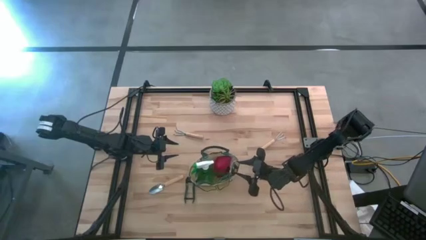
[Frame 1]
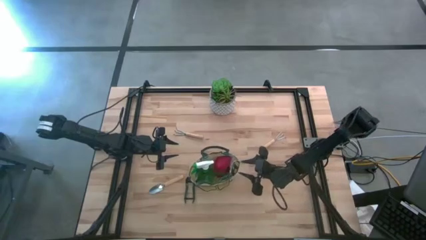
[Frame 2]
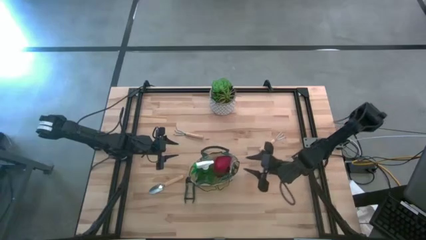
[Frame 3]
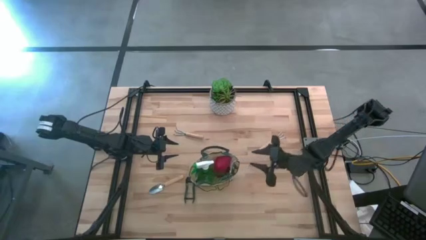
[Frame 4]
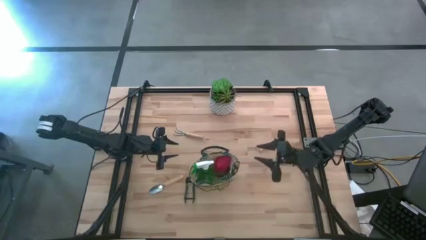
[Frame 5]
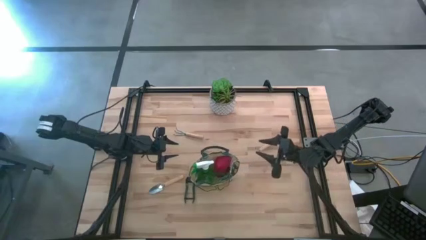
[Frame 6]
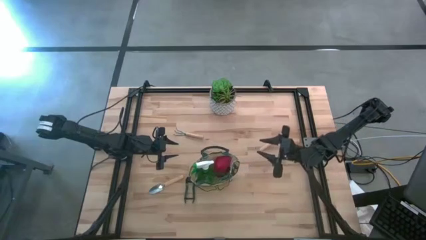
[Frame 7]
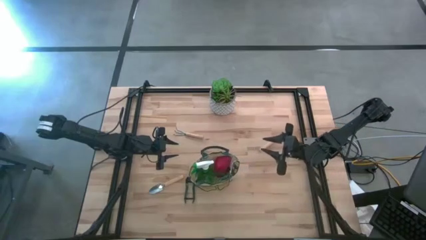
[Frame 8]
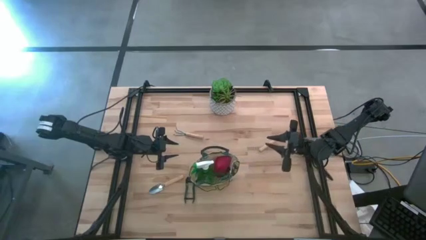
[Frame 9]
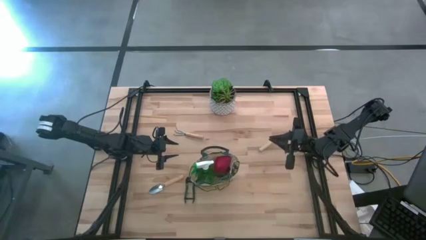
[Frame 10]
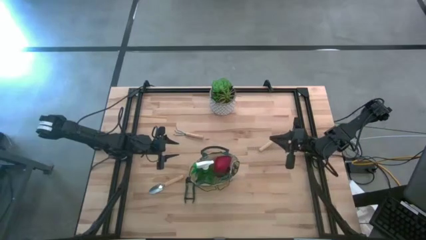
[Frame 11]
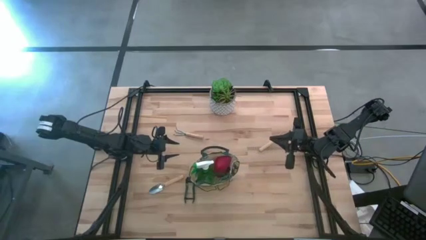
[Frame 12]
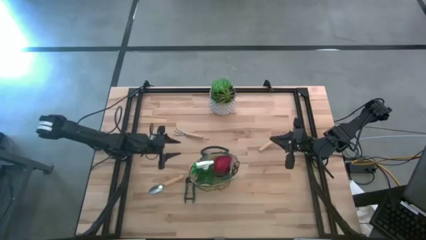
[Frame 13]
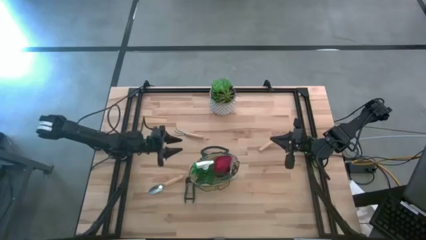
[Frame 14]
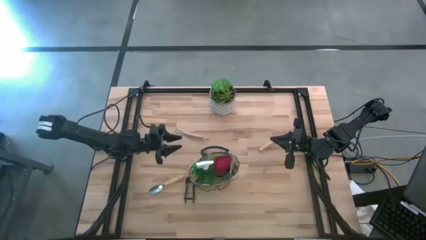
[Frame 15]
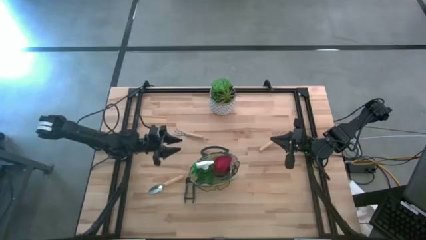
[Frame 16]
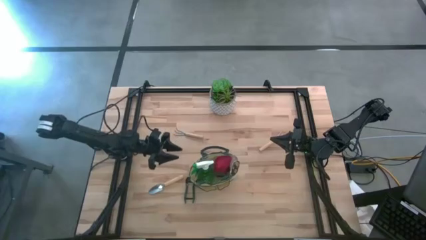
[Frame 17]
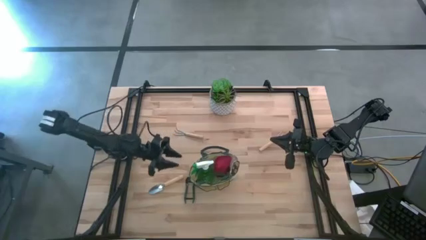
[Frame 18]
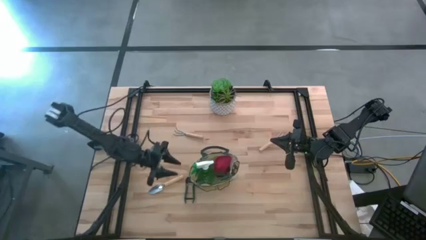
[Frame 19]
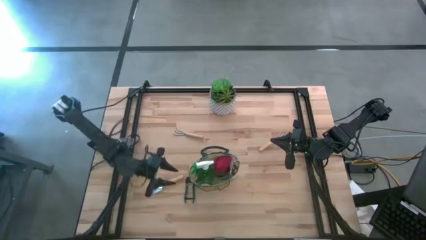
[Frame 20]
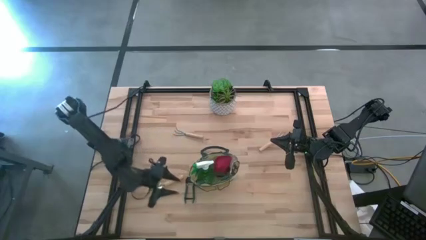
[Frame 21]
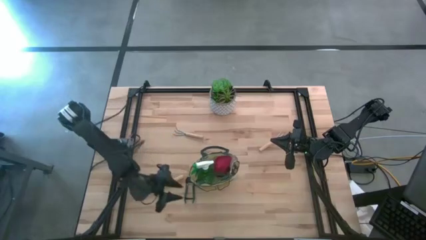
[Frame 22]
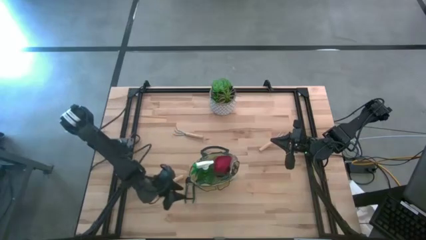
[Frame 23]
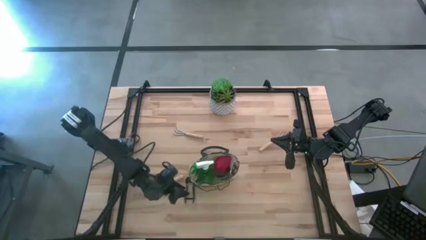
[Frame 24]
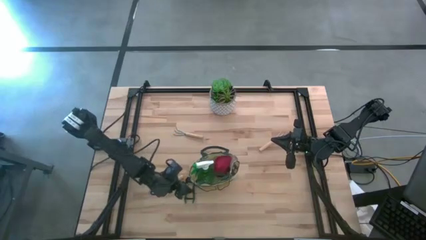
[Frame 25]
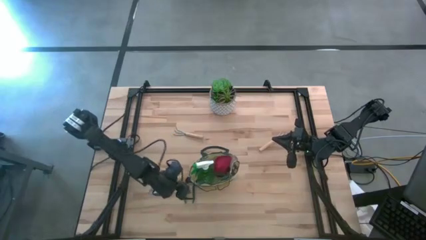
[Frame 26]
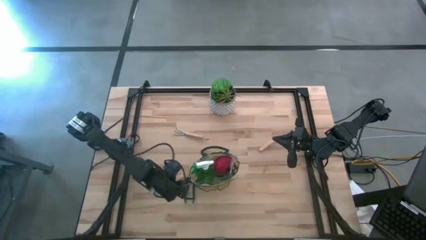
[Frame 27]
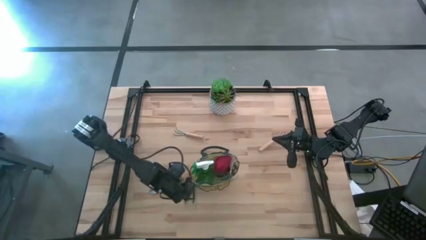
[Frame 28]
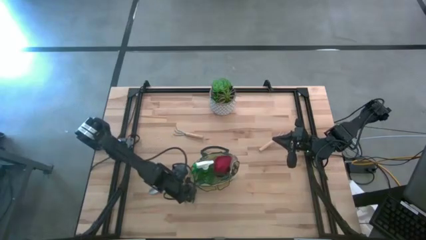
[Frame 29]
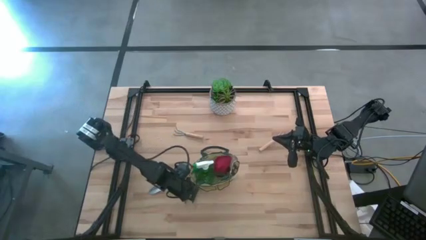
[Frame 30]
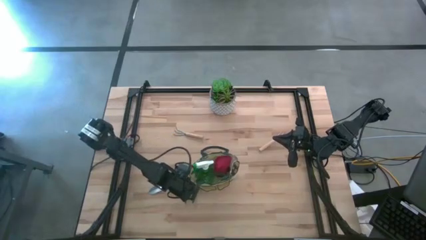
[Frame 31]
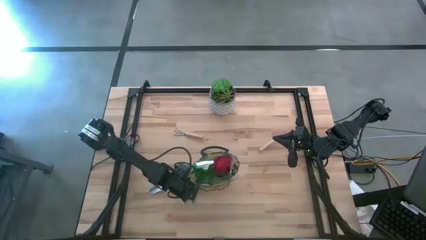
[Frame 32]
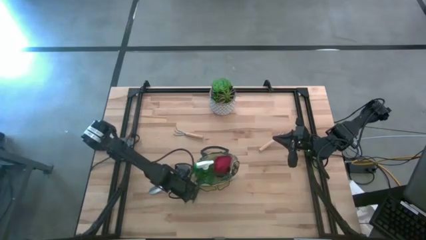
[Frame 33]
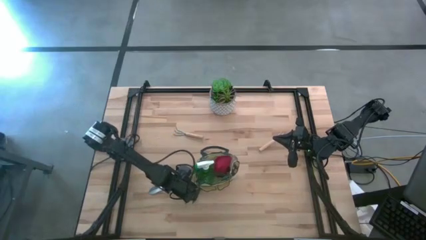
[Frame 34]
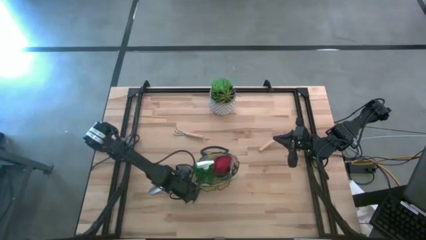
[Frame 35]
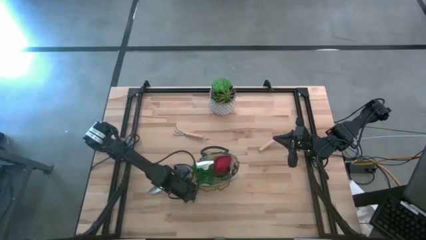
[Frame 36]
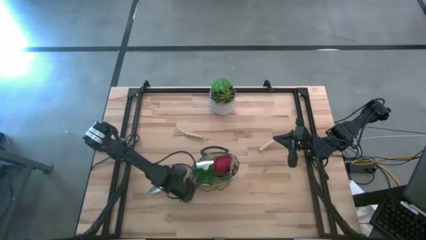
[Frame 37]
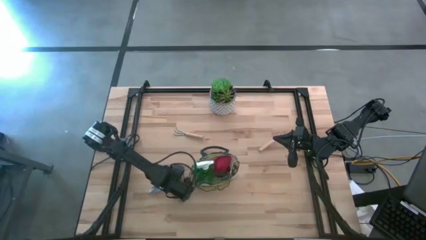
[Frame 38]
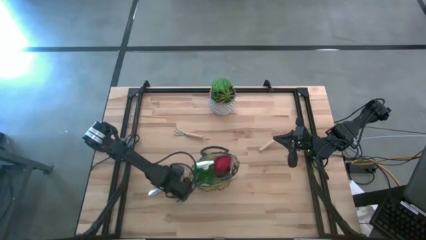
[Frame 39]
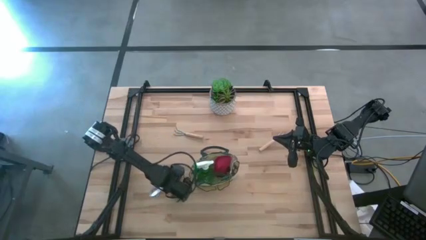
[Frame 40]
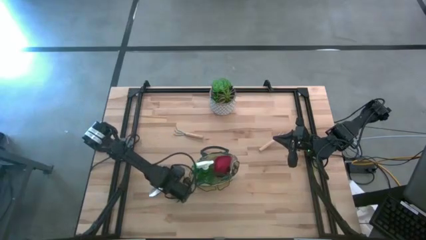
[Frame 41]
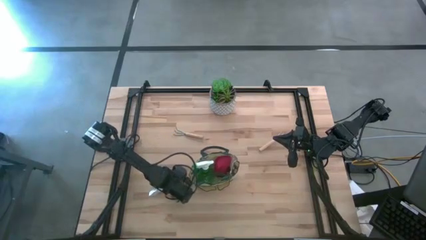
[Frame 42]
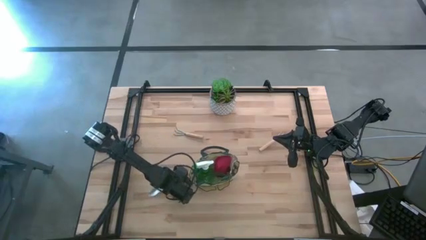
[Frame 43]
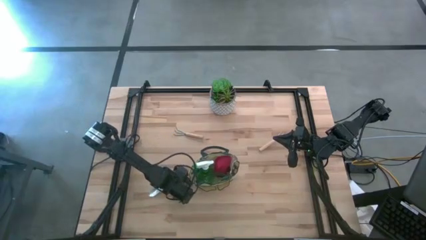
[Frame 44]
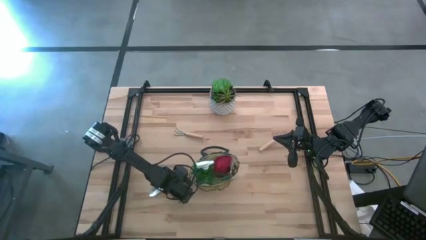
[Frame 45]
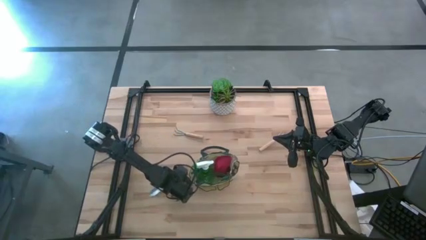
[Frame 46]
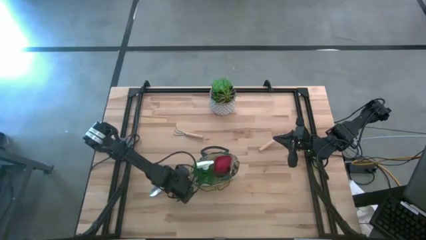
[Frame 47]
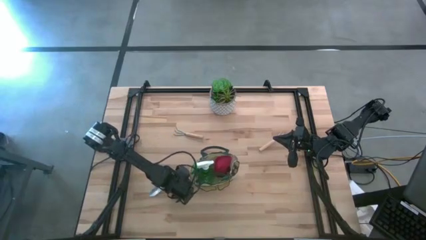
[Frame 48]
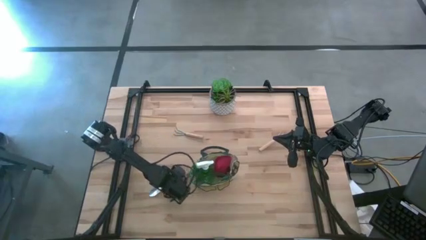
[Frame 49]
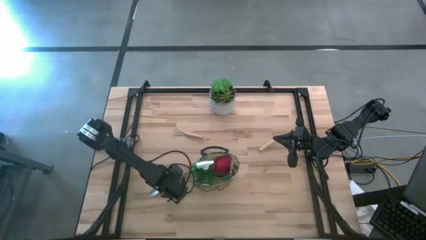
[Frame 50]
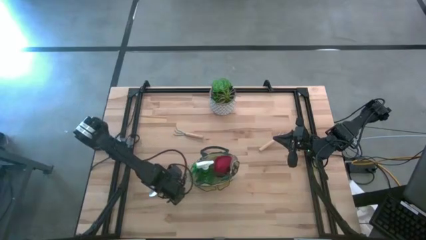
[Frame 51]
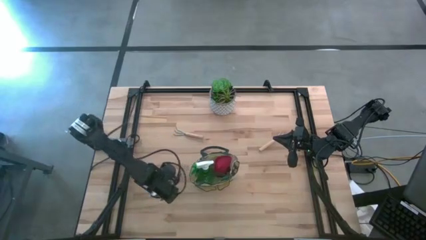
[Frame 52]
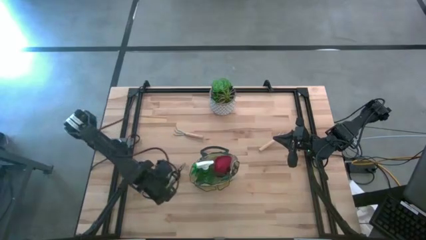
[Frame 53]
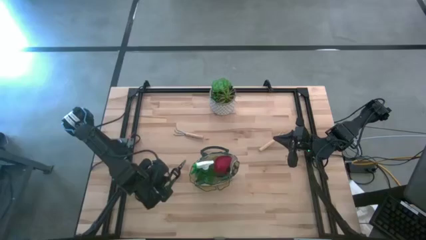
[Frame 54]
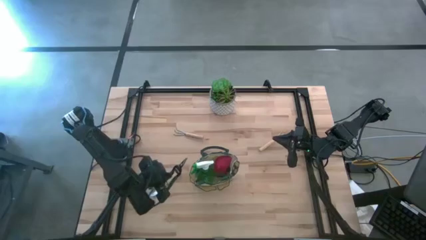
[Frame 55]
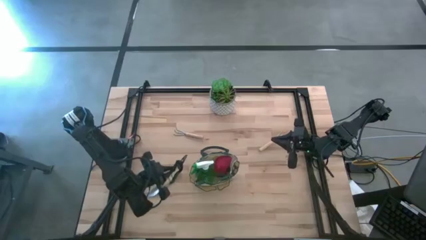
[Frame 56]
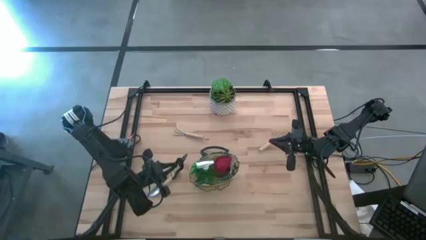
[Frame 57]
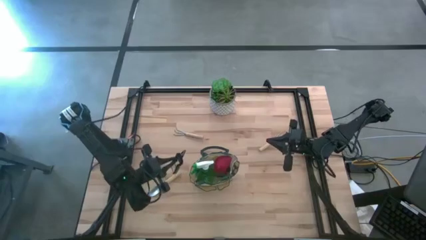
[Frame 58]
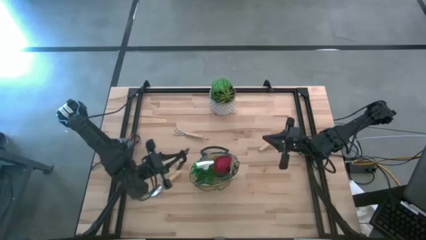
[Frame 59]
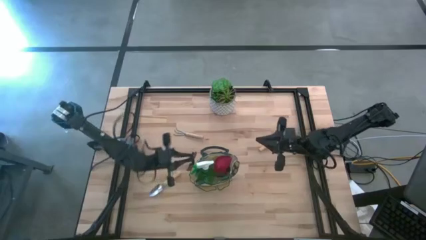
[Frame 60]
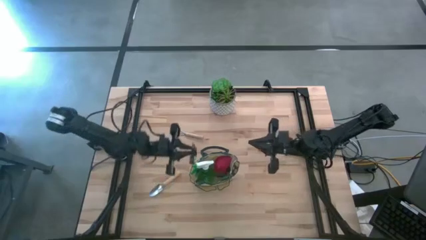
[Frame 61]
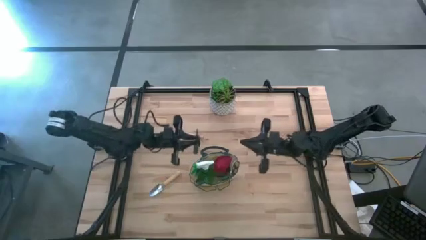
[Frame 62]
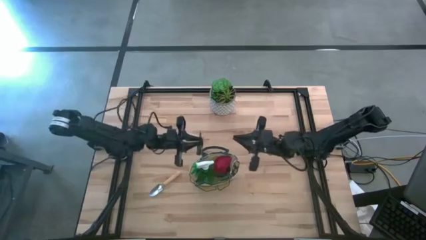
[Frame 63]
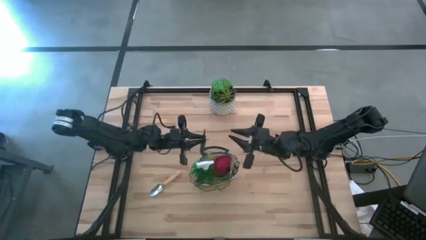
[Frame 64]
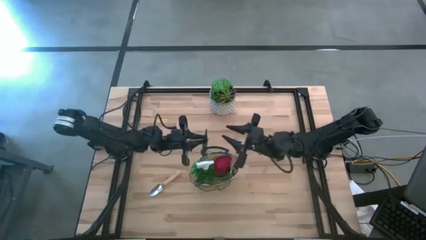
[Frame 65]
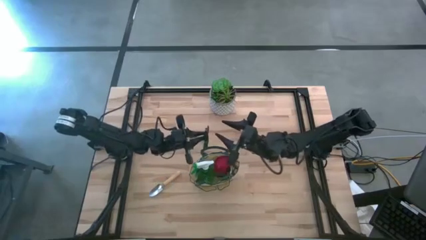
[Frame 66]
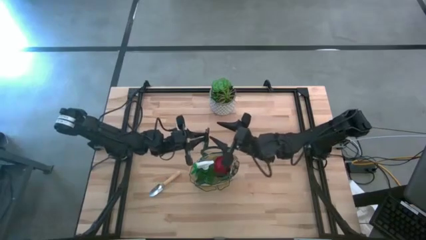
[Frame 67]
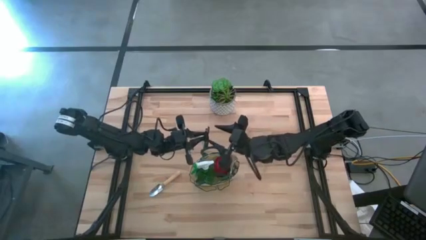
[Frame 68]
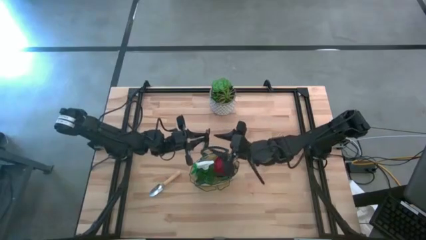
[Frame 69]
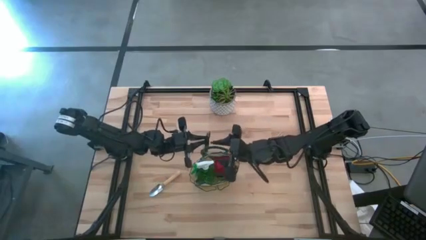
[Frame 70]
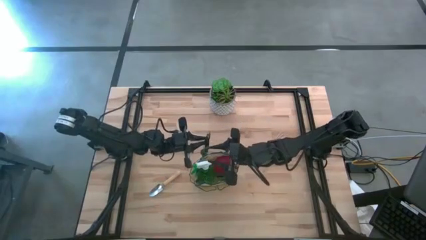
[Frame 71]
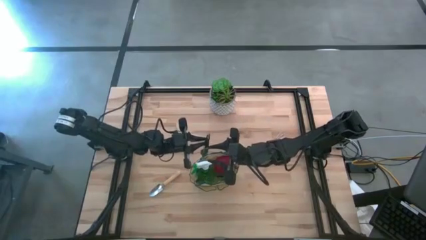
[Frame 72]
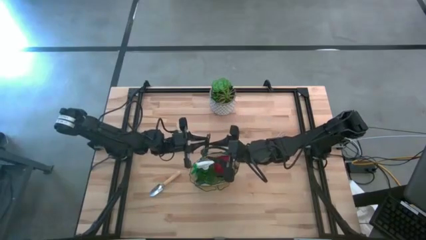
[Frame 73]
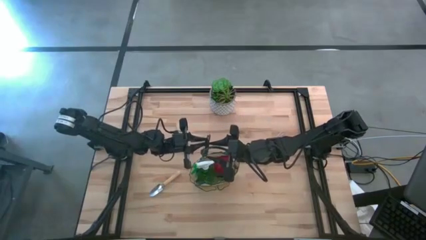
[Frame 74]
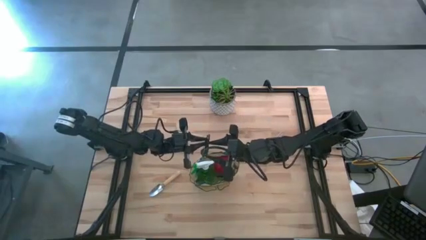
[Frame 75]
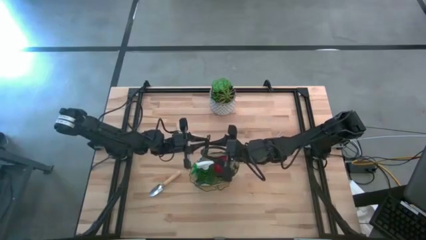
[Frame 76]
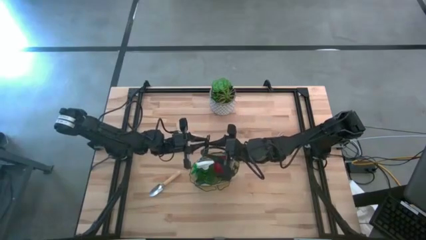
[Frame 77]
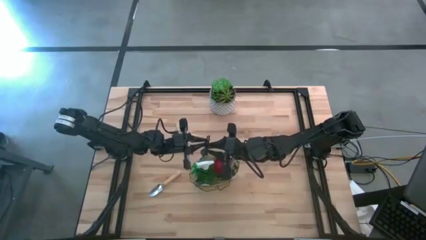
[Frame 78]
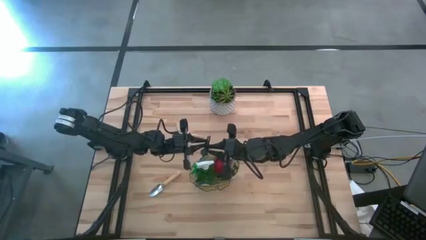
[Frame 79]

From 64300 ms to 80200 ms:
Task: Pick & Place Garden tools in Gardening bag
Put the green shear scissors into the white gardening bag

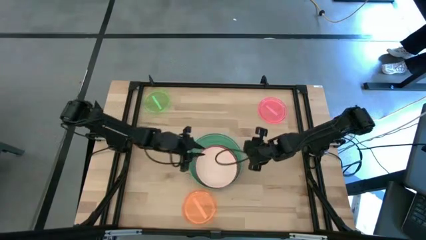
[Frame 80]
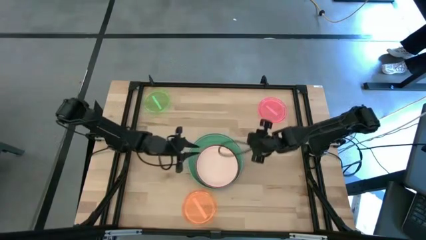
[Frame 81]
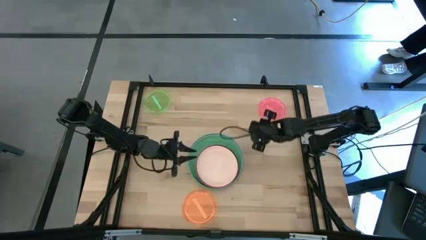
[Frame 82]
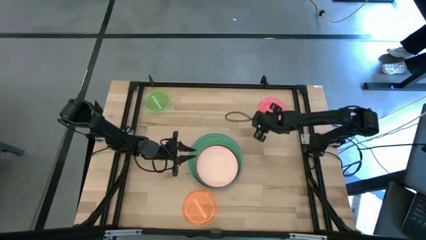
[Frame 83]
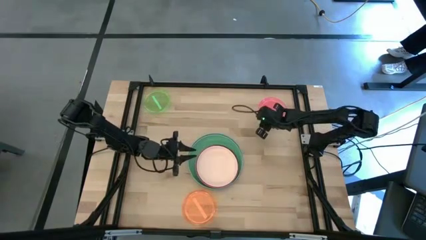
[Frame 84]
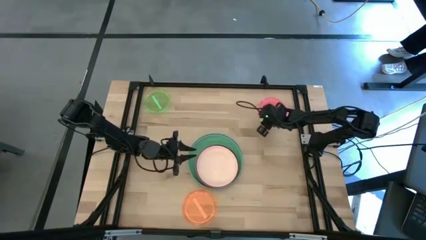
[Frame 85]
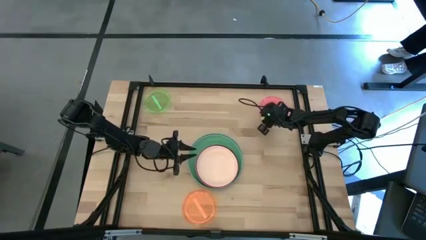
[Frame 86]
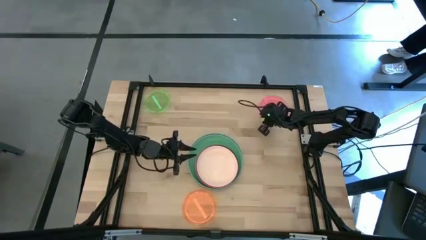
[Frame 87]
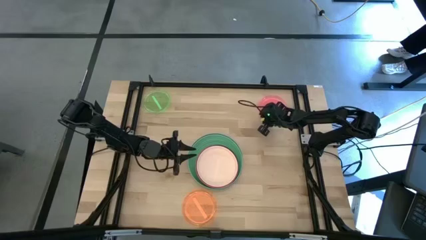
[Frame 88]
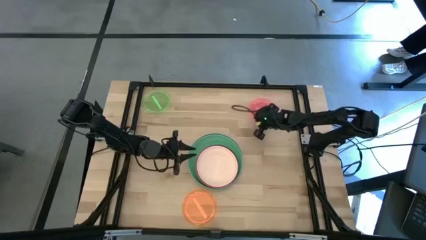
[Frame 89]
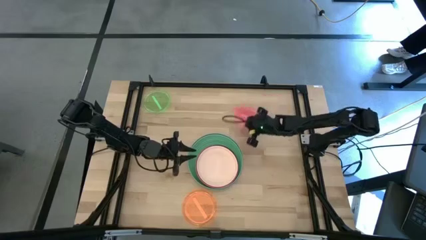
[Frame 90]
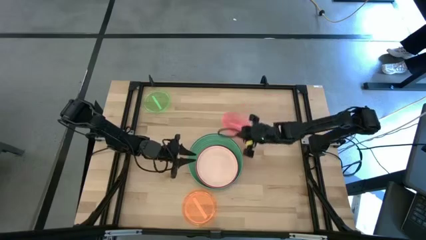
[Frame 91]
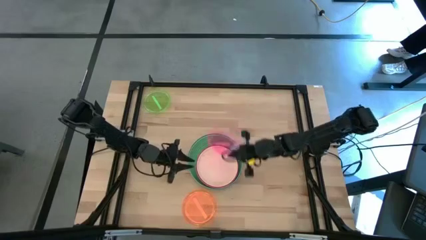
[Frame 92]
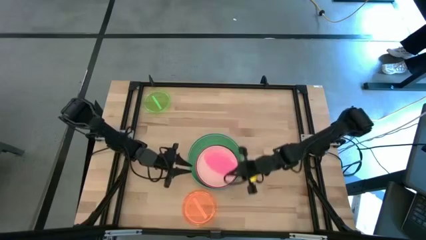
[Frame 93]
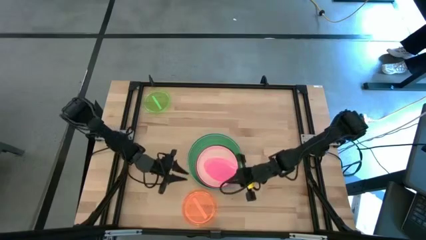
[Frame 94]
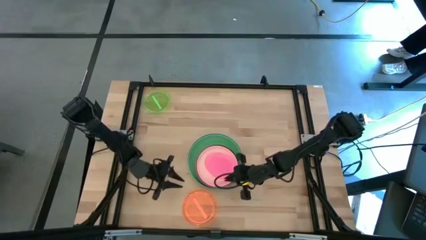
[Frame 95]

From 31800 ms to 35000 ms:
Task: Stack plastic plates
Stack the small pink plate on top of the white plate
